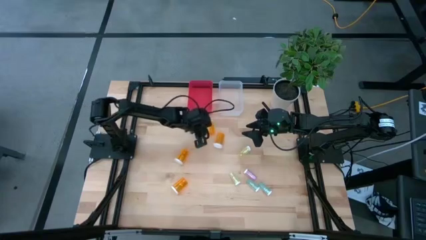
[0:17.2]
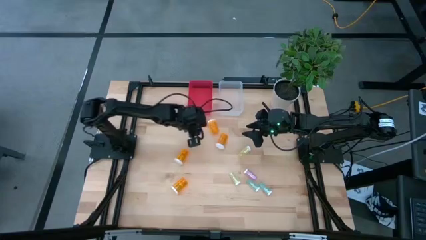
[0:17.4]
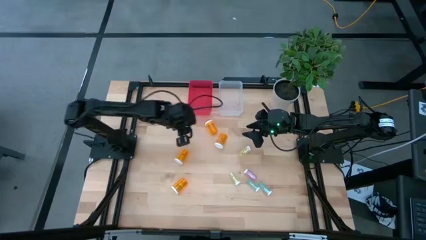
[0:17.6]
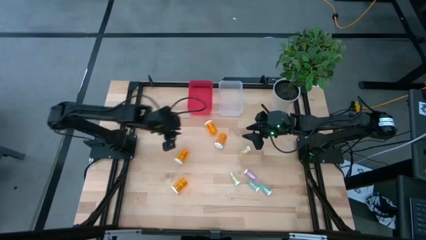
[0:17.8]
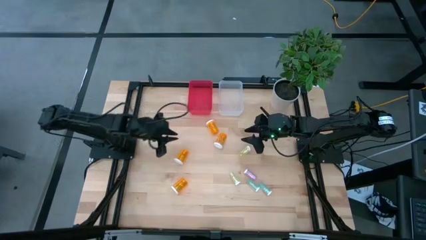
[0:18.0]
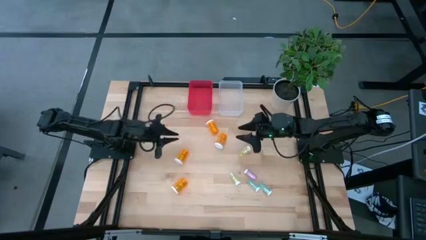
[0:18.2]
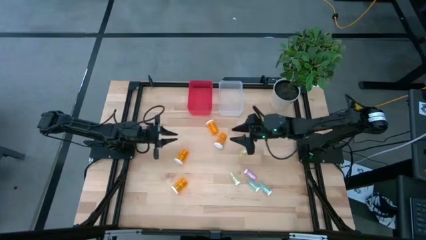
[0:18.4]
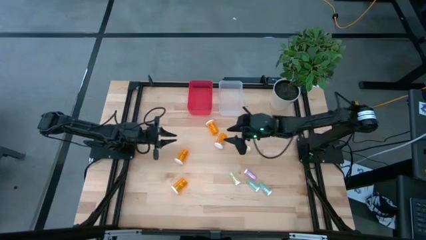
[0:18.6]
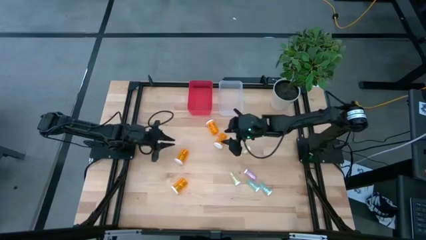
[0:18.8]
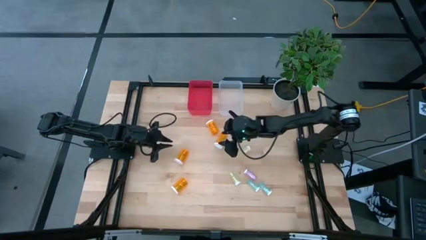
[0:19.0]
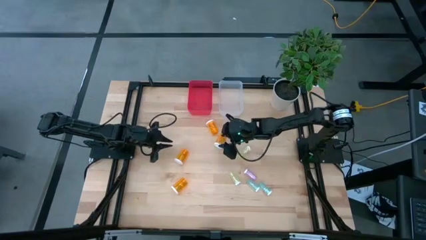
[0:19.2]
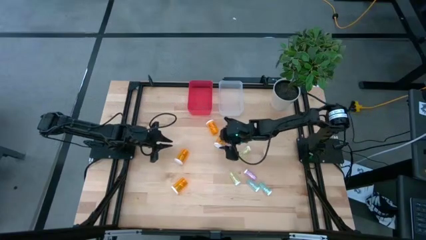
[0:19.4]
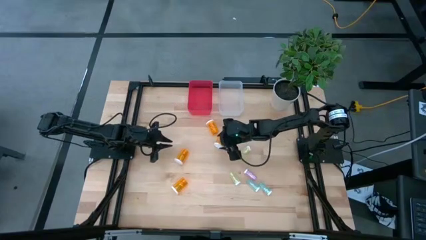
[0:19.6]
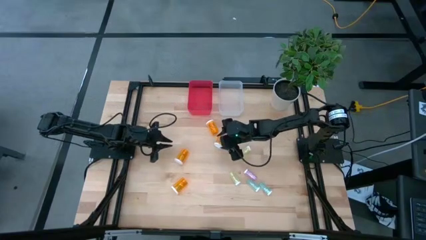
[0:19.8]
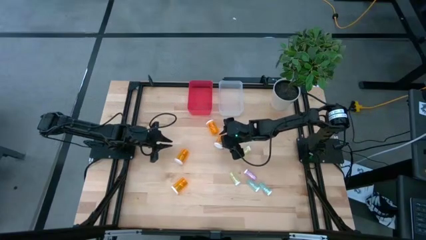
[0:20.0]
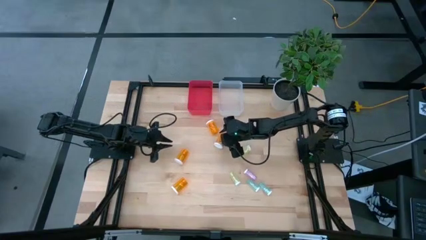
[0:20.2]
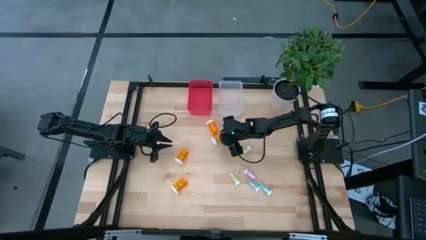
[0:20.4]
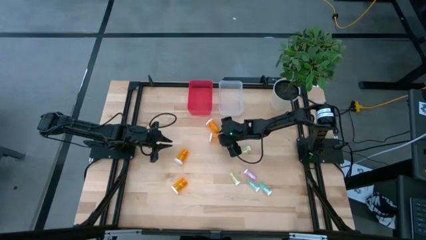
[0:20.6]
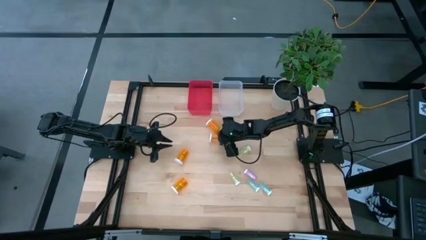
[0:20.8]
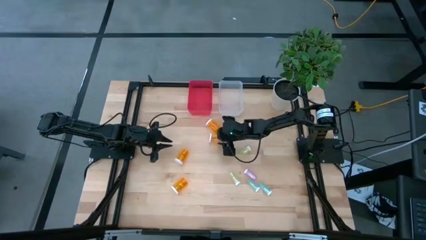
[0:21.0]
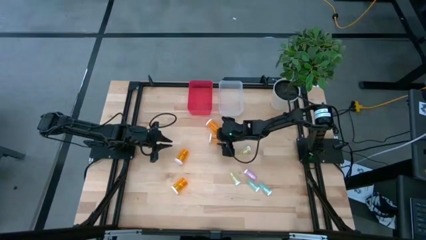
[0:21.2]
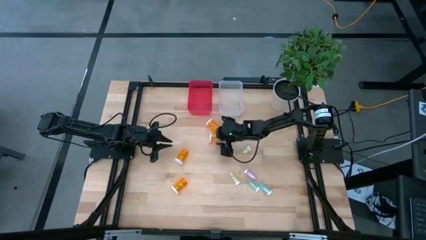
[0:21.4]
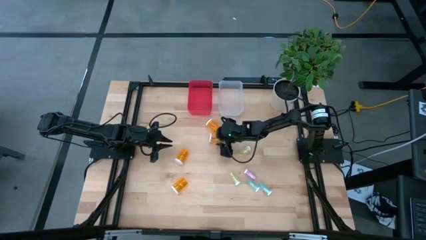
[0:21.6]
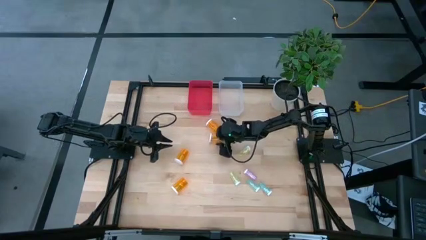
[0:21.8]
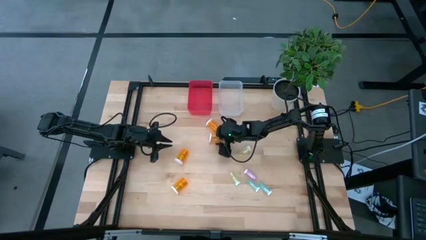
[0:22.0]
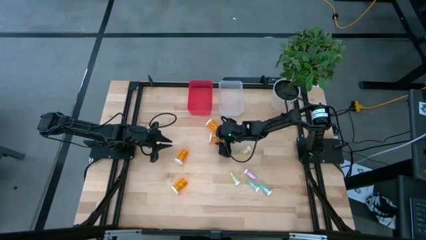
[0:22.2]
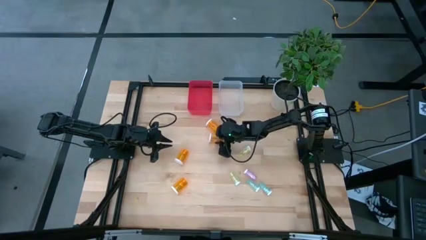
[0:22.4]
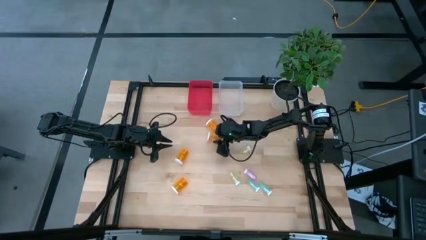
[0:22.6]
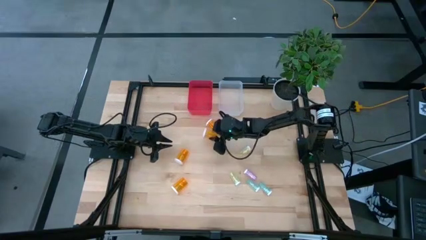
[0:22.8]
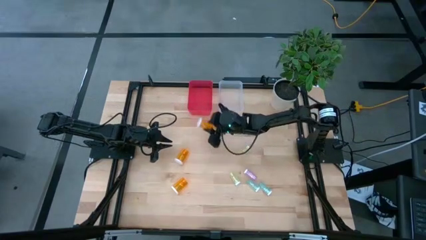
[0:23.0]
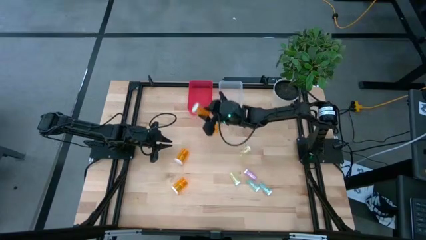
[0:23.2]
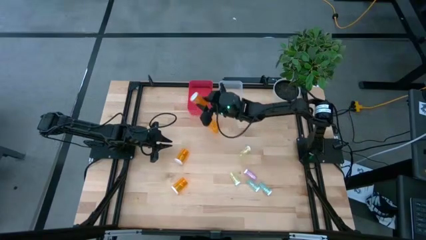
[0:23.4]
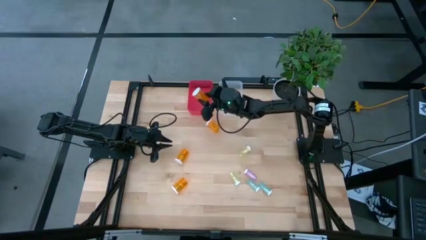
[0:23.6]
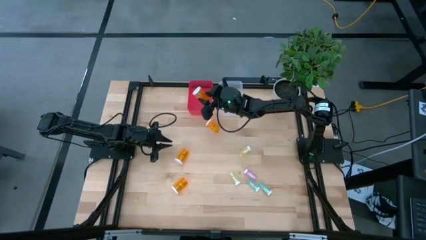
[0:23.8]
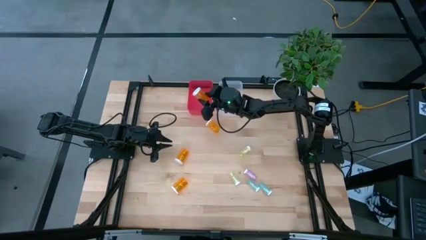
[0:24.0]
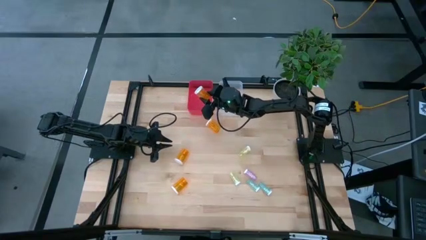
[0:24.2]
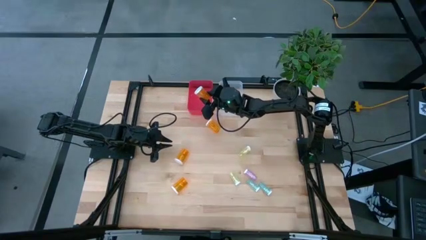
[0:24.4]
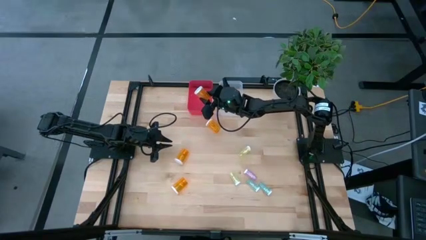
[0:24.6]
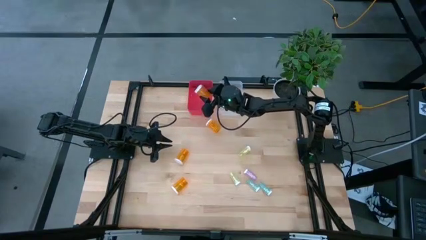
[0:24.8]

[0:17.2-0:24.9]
Task: Pick and place medicine bottles into bin by pill shape (circle, oval)
Put the large orange pill bottle into the red bin

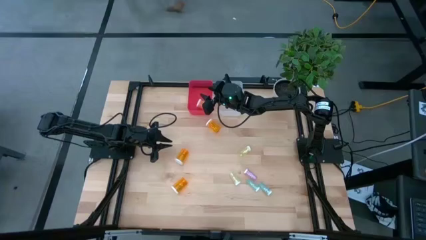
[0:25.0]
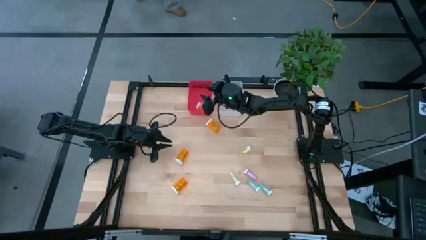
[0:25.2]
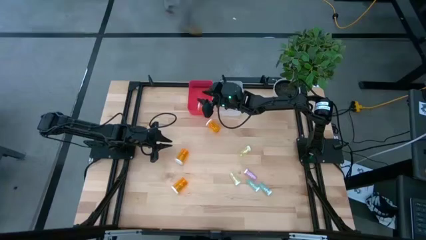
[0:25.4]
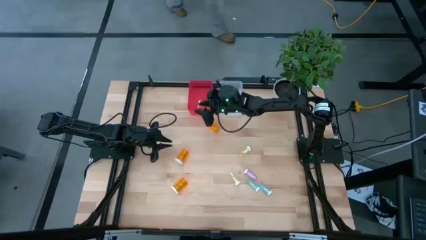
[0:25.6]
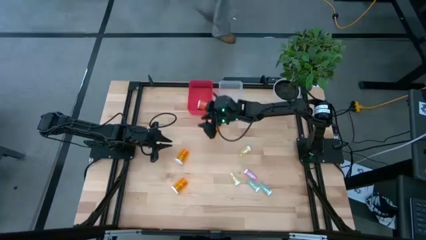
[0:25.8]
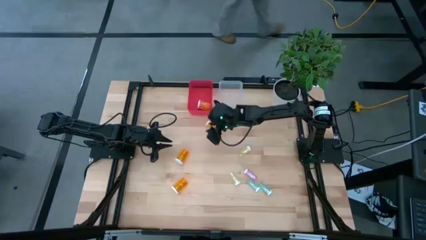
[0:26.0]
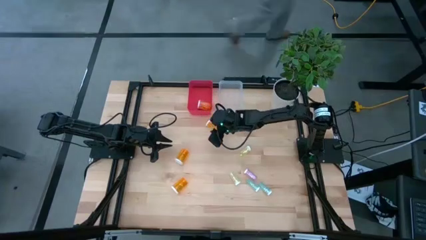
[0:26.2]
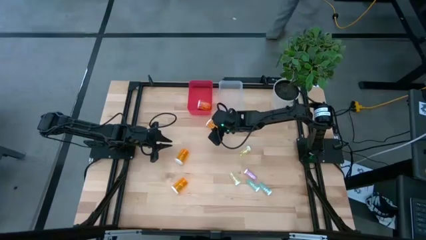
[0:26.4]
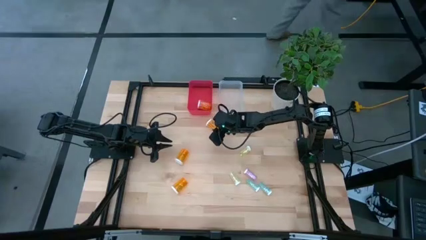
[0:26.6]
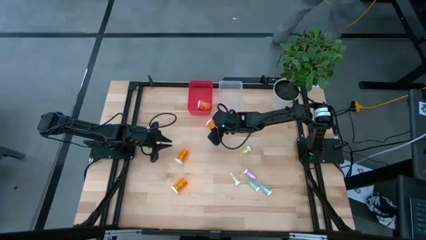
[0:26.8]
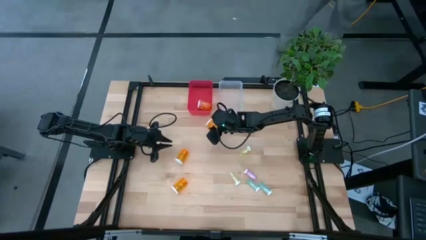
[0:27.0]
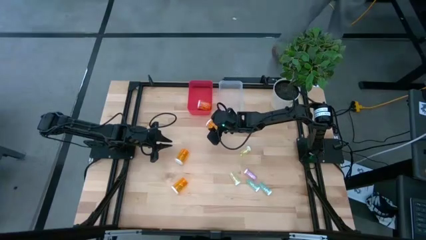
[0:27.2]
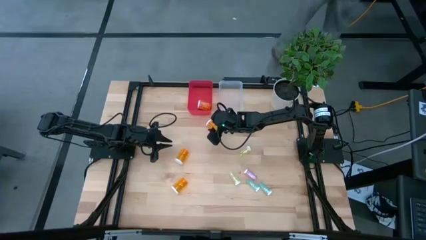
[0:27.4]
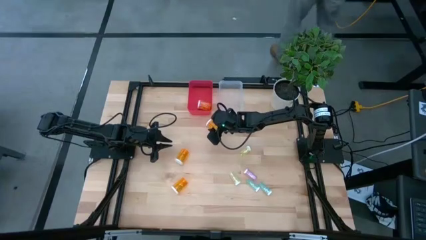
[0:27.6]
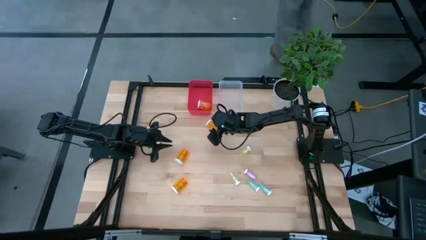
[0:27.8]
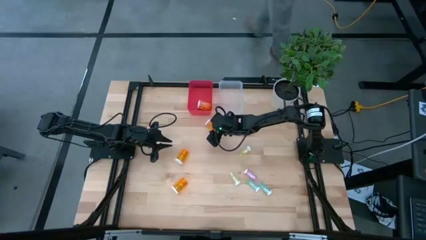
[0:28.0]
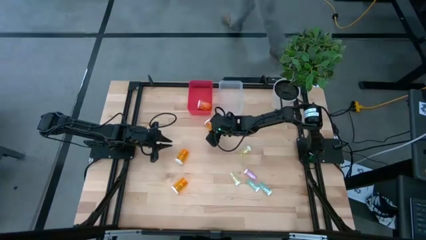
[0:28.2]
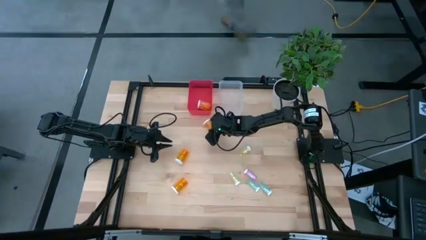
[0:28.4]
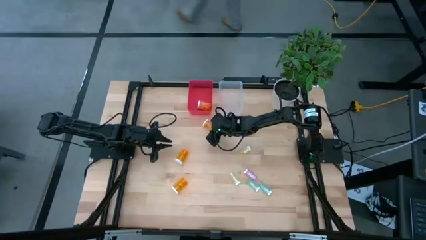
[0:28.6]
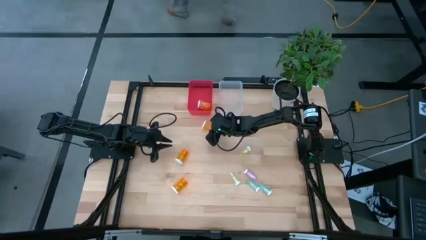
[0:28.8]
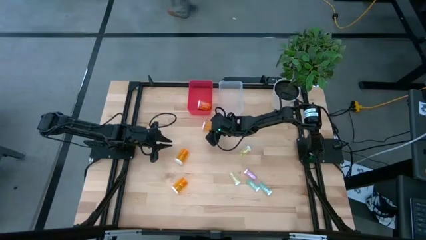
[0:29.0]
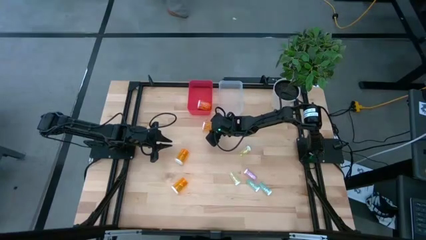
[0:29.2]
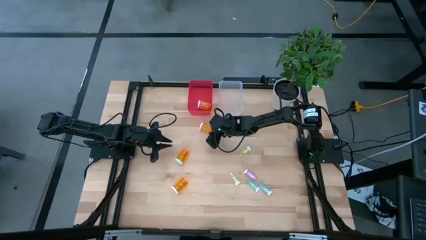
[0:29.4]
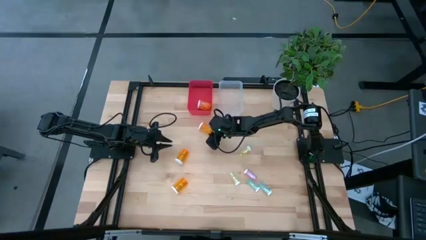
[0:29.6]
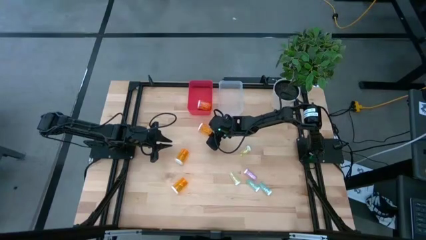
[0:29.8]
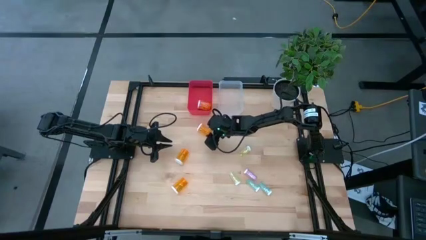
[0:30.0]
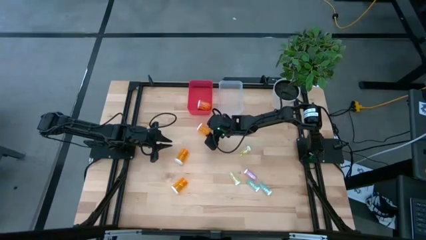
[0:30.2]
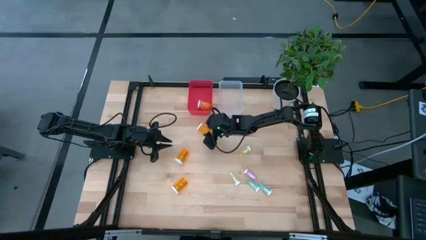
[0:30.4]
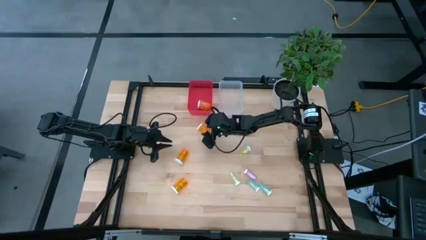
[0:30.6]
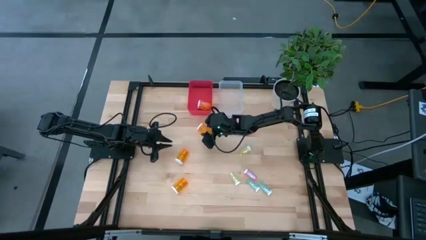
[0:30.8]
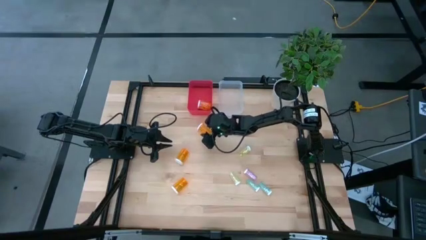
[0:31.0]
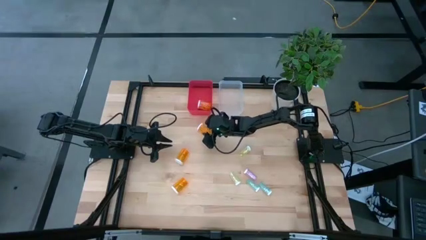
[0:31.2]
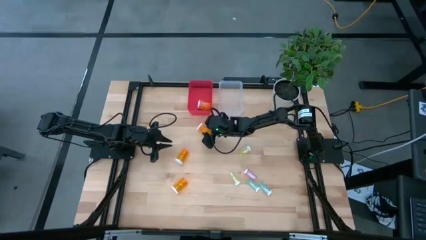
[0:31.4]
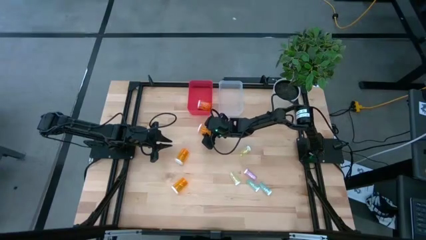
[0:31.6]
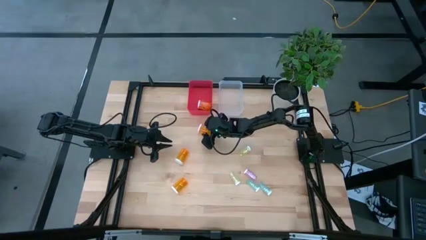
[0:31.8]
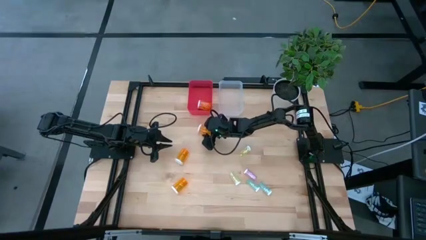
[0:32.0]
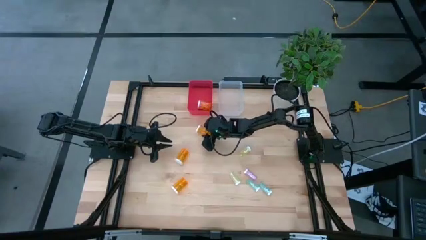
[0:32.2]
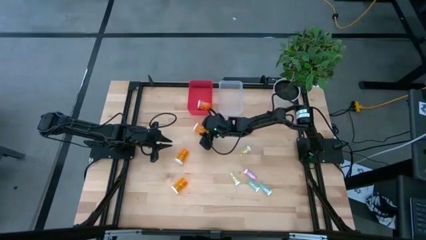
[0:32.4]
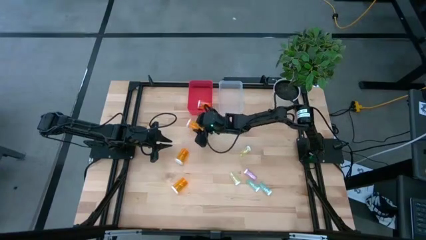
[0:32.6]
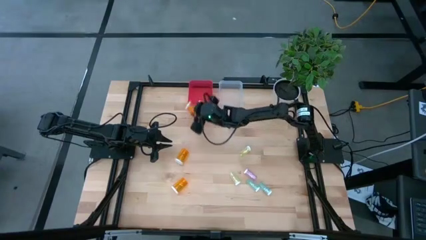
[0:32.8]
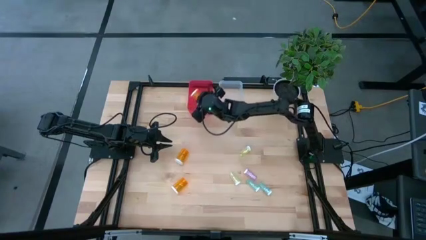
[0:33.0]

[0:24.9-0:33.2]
Put the large orange pill bottle into the red bin

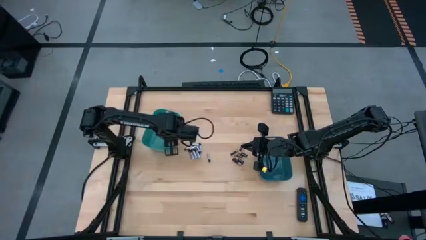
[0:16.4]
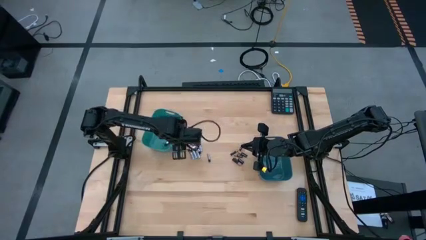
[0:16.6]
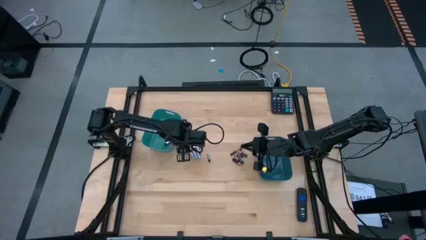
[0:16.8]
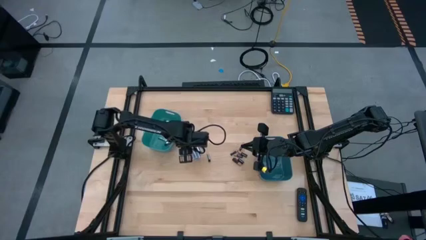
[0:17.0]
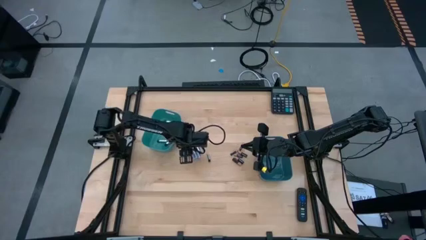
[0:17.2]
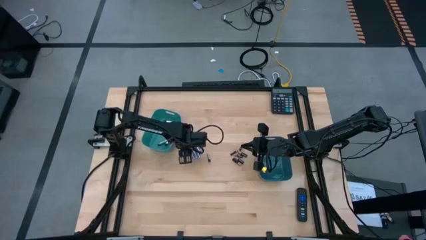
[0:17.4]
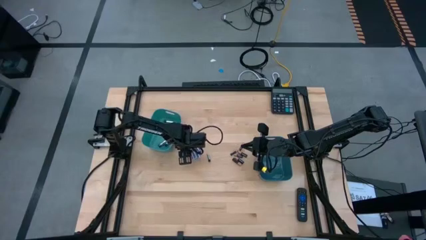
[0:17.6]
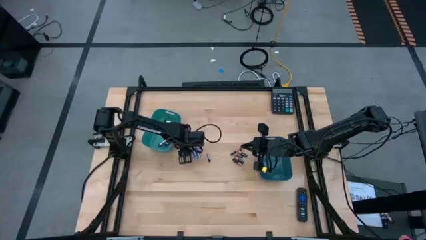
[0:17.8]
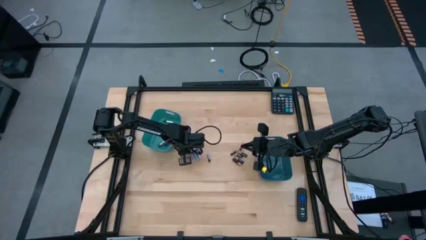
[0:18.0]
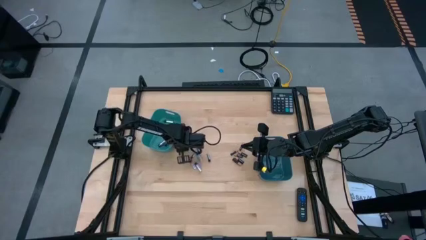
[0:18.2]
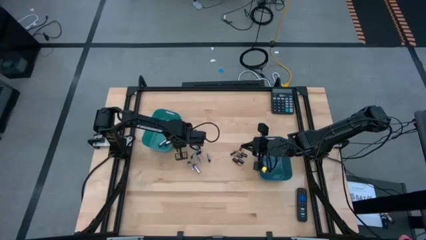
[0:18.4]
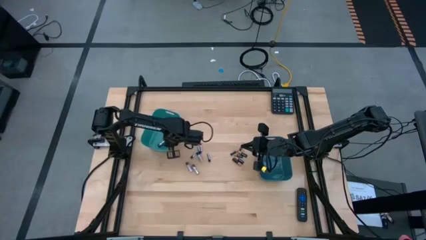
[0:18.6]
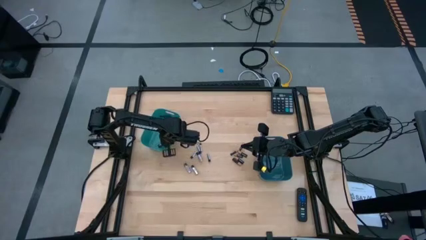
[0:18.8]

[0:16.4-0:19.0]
Task: Sort batteries
Put the silver battery into the green bin
